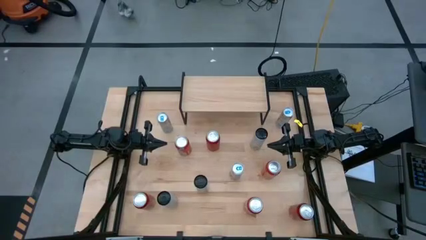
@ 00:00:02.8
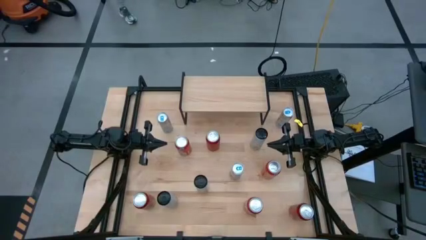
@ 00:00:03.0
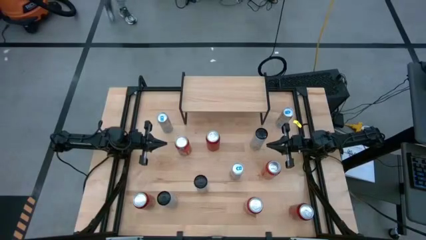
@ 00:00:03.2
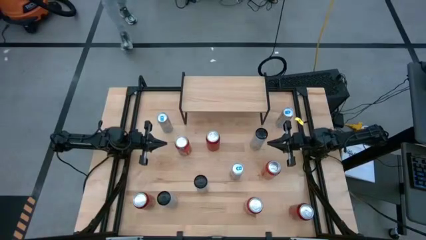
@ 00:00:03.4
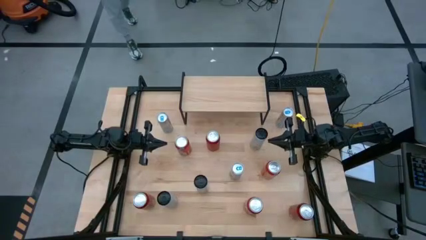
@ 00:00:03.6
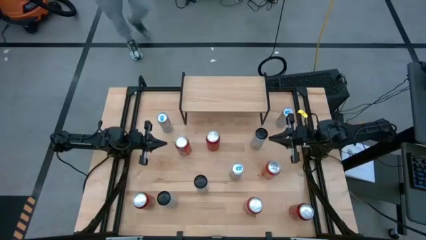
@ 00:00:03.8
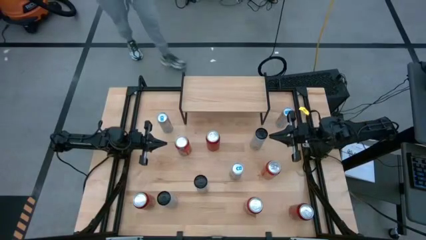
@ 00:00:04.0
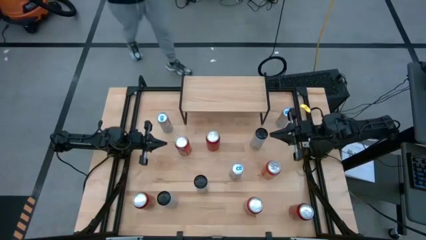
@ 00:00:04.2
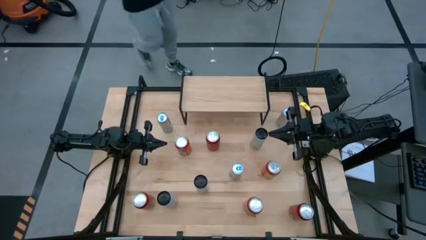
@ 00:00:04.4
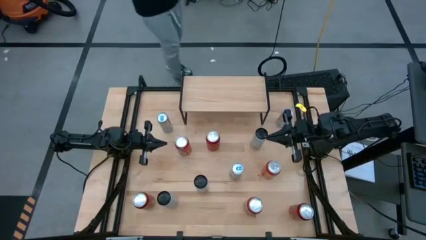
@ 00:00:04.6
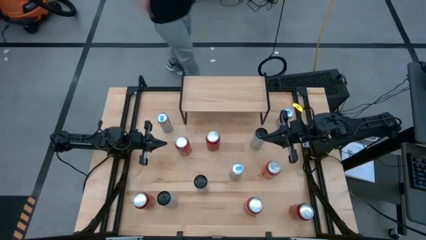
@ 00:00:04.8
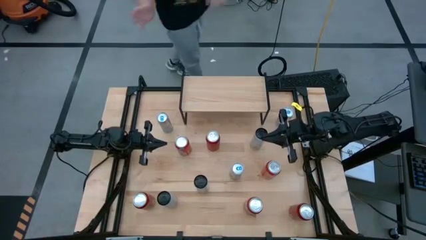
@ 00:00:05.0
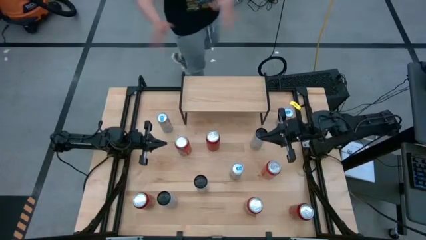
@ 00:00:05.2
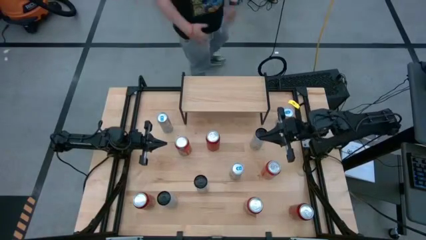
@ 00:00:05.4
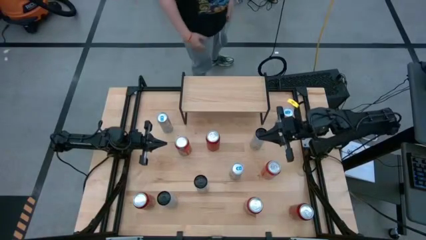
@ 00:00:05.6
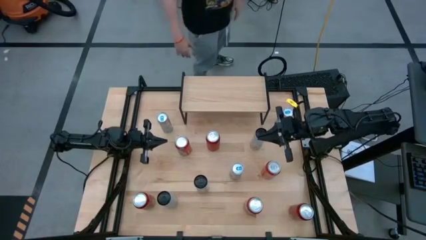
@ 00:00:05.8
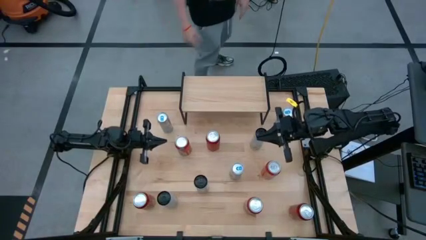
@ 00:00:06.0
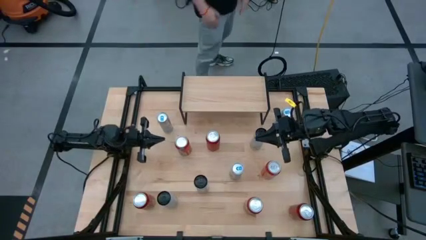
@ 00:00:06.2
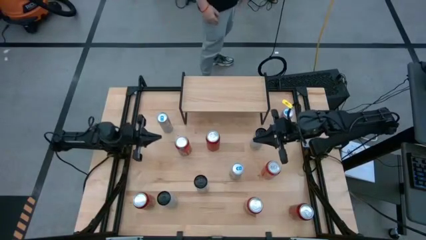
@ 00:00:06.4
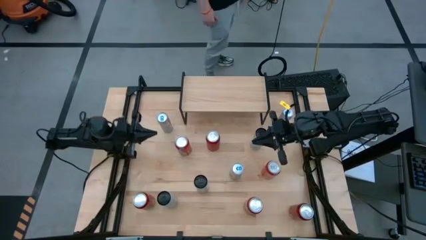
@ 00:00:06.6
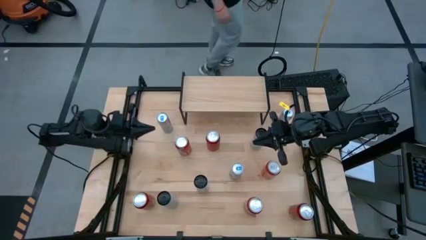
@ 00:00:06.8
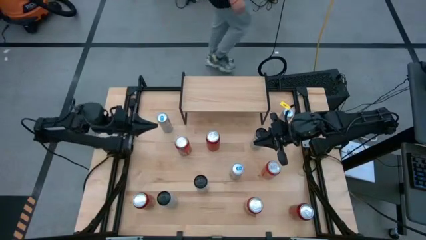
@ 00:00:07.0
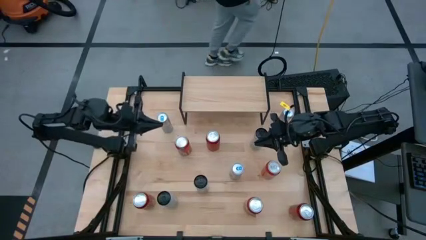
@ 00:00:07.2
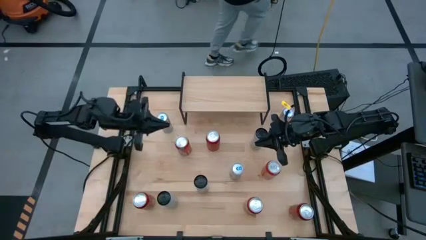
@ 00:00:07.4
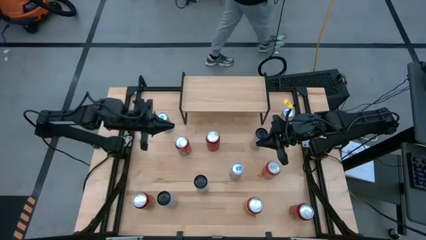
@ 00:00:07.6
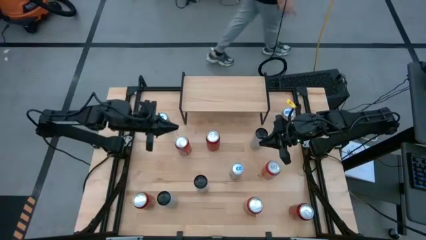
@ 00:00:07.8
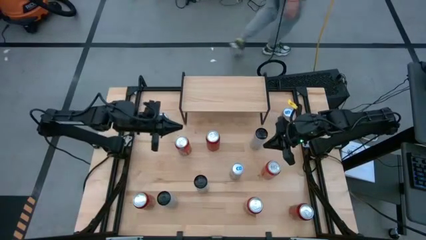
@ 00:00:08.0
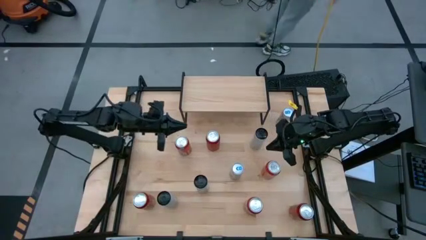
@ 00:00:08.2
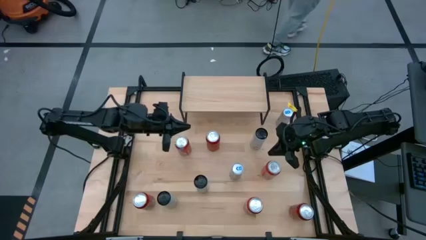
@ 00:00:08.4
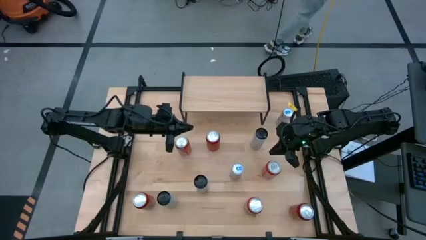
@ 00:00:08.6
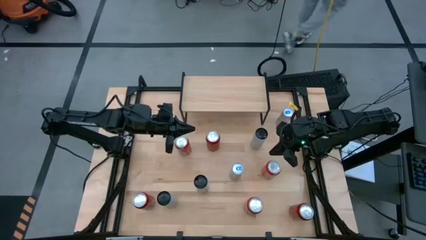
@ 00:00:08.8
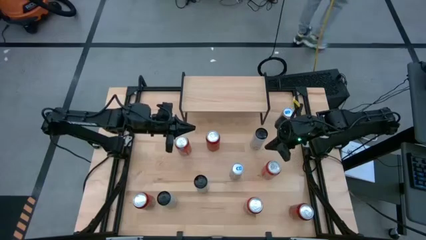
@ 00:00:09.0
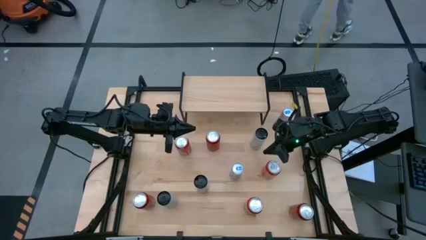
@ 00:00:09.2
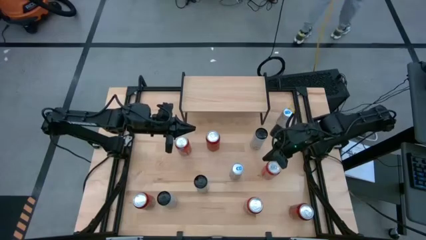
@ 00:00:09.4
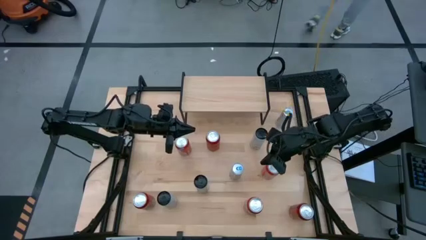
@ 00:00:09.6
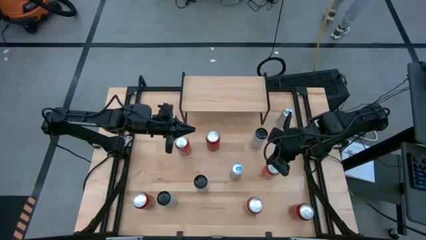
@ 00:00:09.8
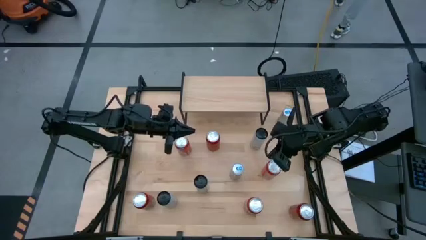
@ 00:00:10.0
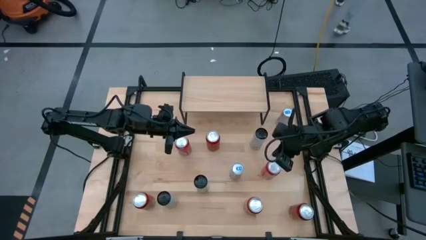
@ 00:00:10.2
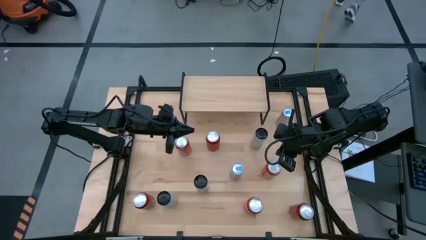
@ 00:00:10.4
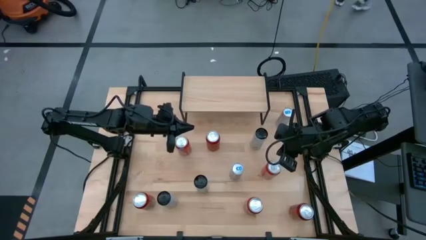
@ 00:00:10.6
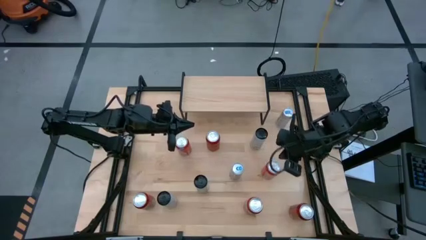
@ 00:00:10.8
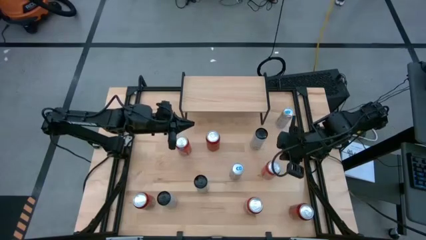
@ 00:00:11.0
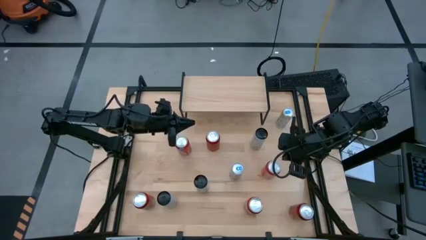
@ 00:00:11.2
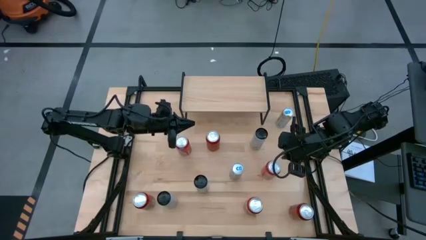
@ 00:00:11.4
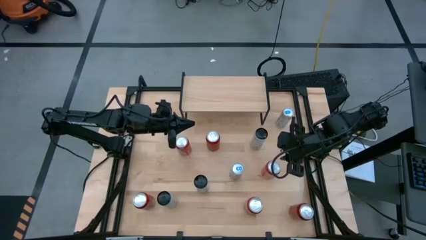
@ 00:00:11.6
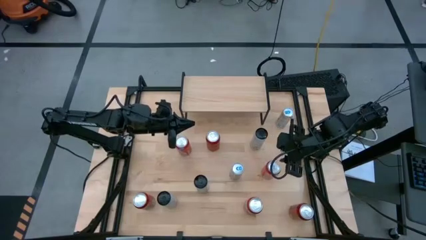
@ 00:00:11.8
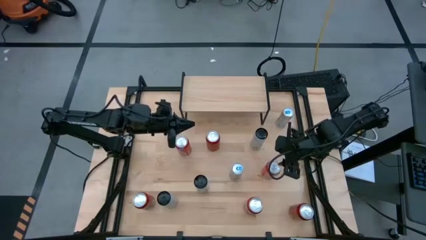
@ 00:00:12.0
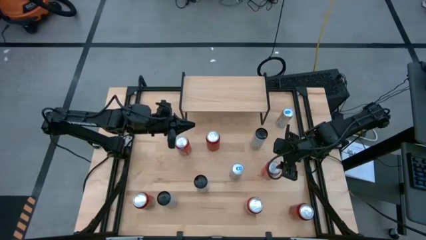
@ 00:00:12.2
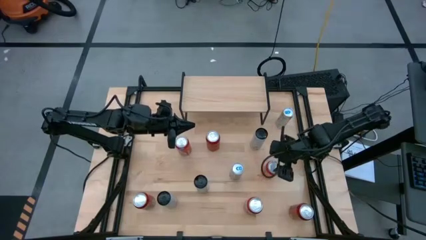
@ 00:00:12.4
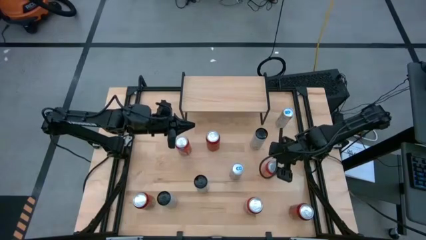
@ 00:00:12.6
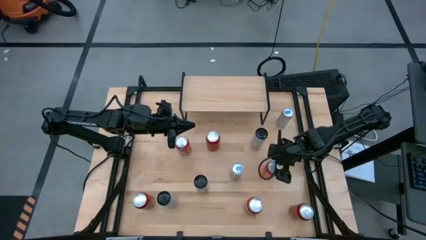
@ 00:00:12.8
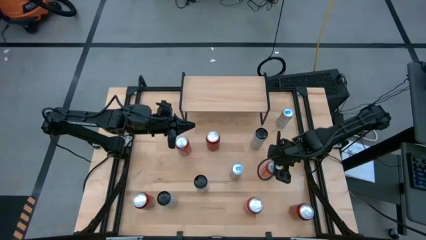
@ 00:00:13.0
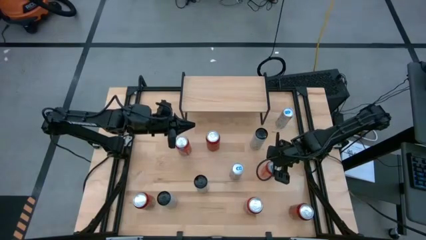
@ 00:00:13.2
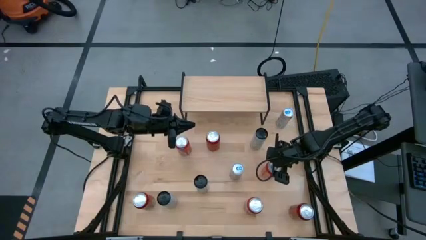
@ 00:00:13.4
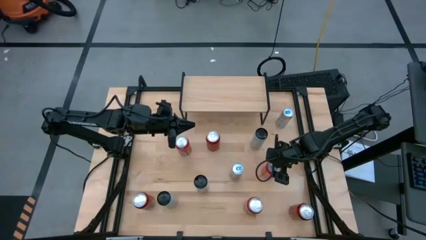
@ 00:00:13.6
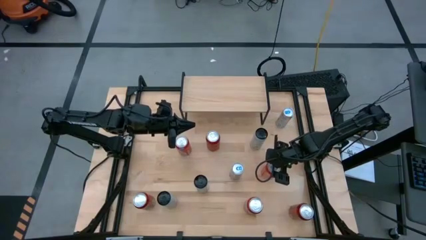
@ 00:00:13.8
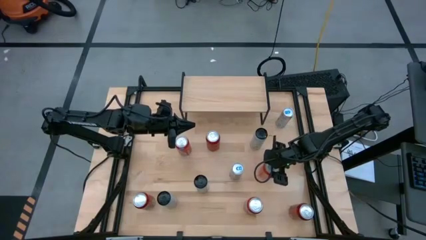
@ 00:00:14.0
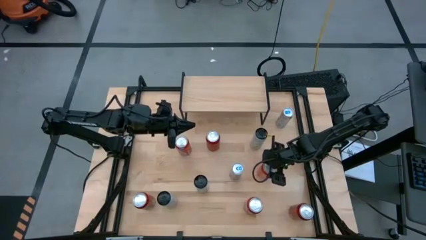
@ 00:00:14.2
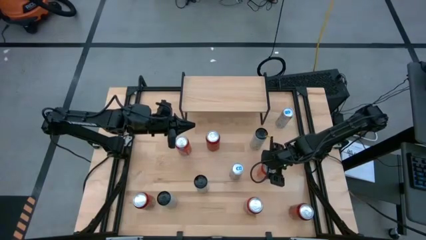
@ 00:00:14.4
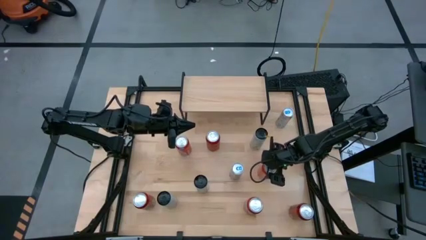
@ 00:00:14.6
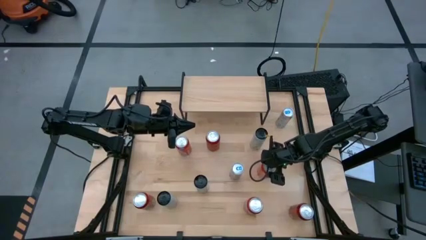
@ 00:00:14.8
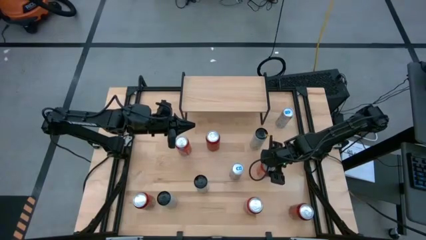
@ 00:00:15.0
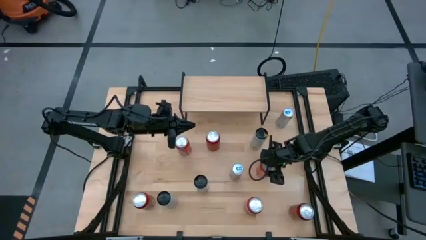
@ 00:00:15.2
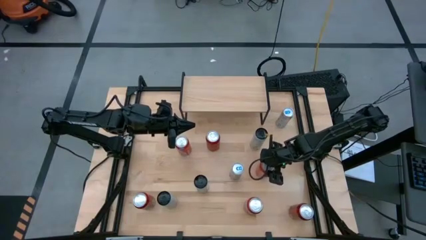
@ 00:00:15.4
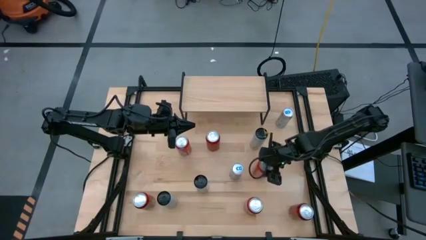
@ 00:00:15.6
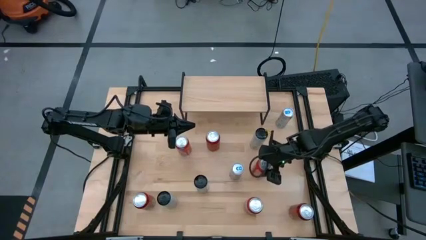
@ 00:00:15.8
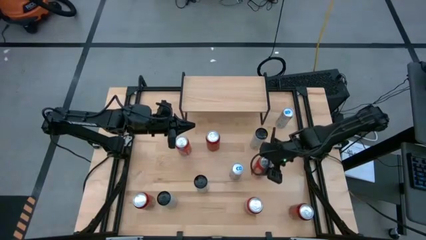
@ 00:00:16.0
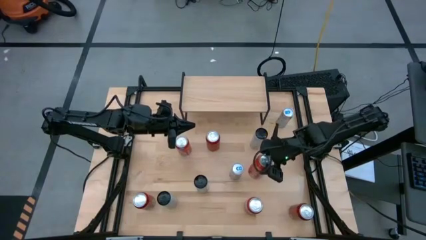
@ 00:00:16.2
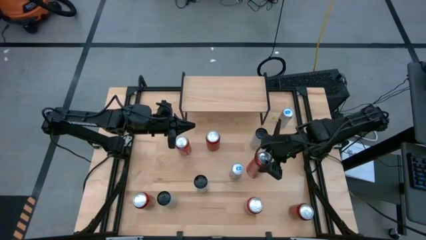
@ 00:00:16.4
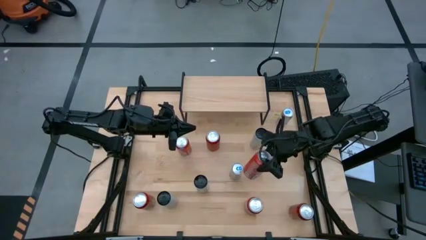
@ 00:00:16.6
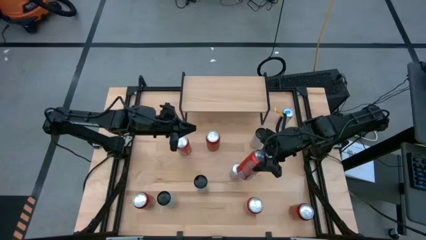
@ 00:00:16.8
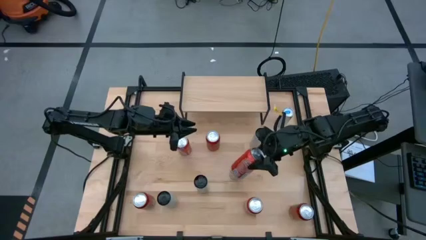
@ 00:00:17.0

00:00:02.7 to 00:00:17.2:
Task: Place canned beverage on shelf
Put the middle red soda can on the shelf
